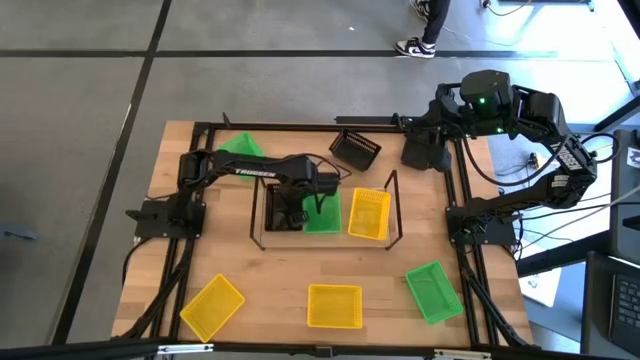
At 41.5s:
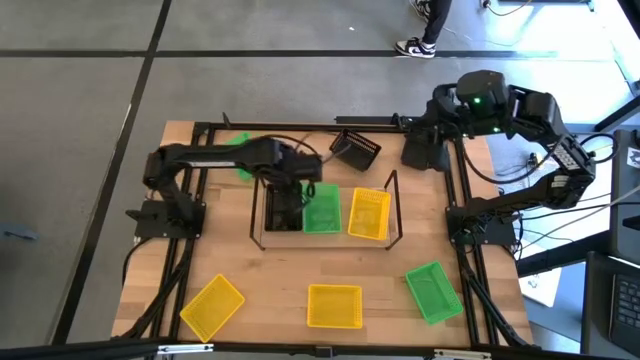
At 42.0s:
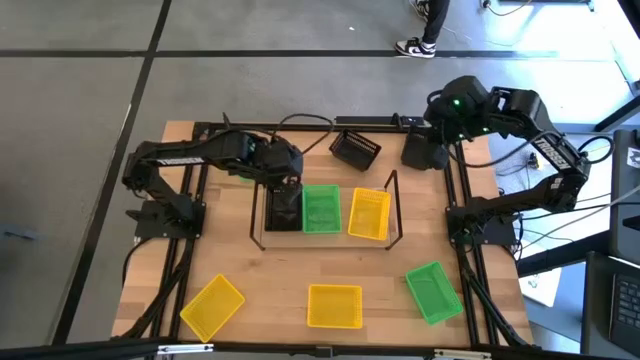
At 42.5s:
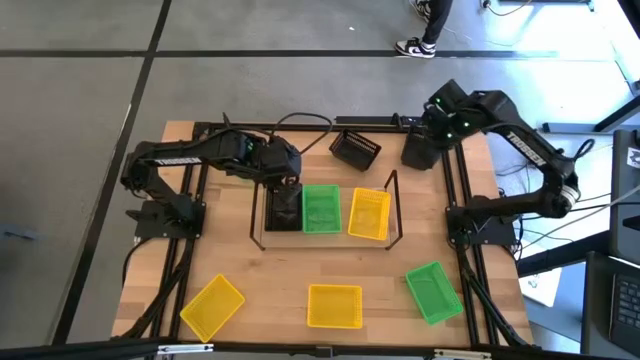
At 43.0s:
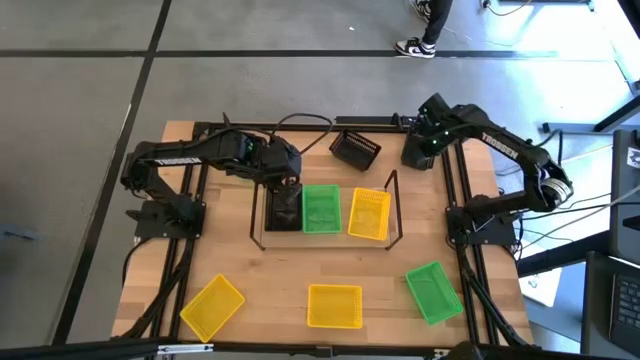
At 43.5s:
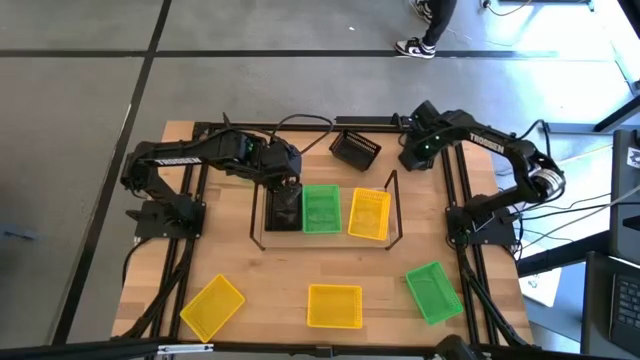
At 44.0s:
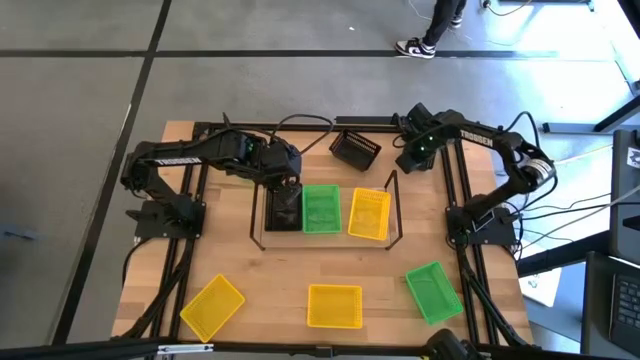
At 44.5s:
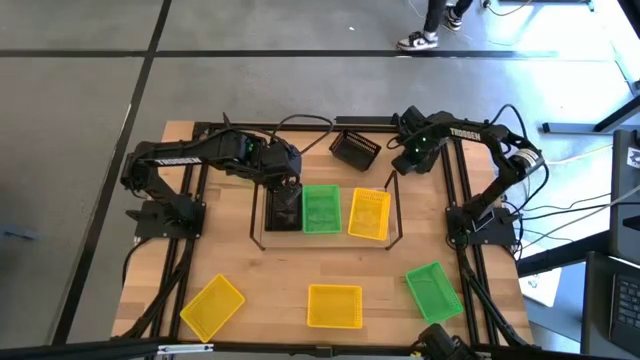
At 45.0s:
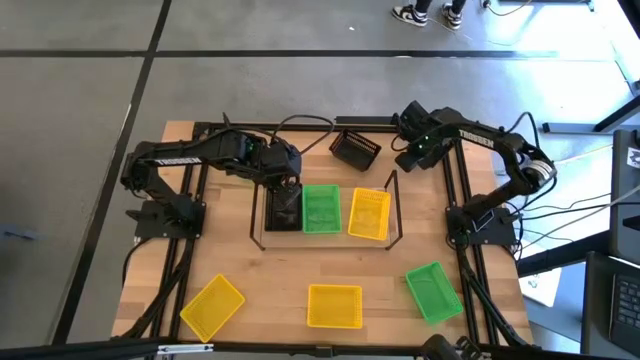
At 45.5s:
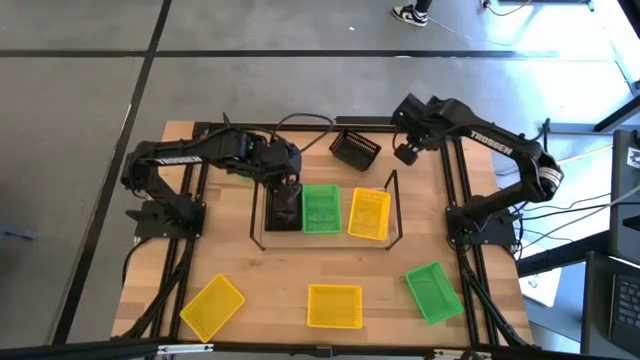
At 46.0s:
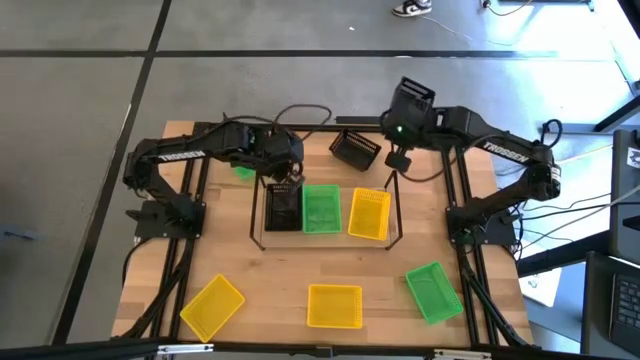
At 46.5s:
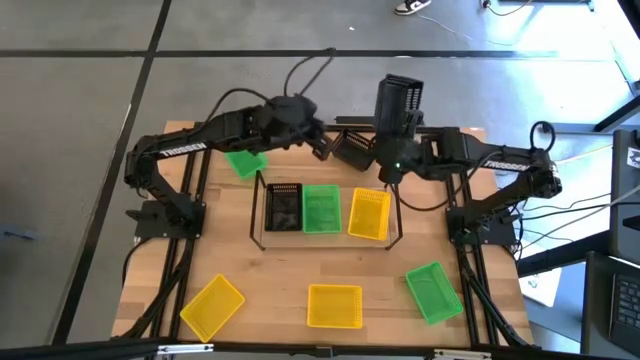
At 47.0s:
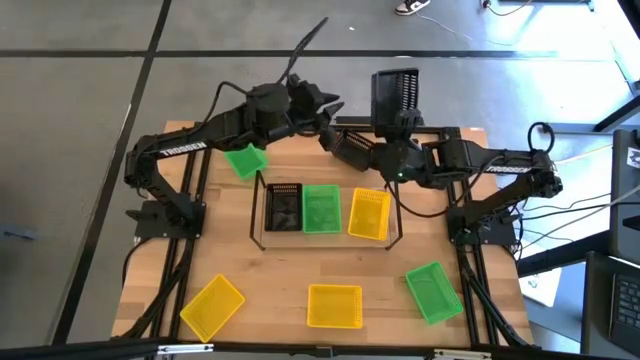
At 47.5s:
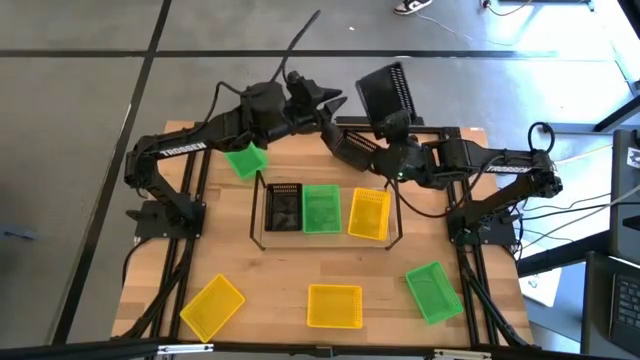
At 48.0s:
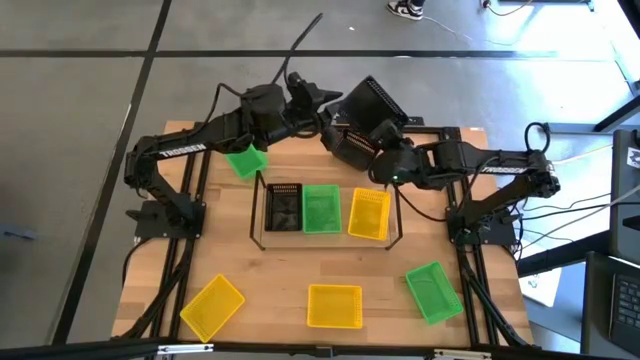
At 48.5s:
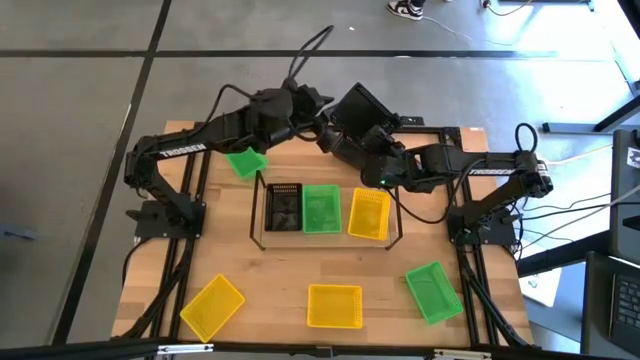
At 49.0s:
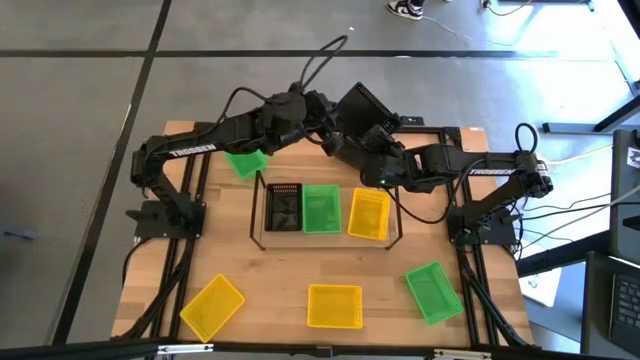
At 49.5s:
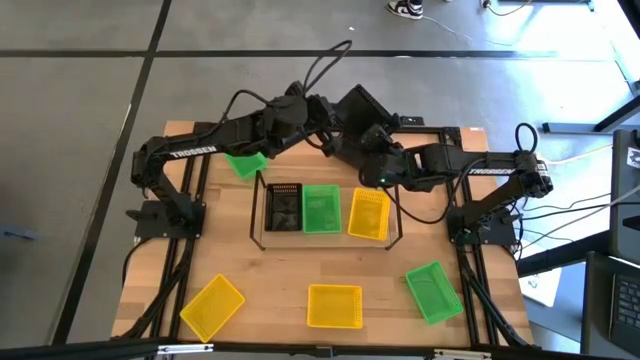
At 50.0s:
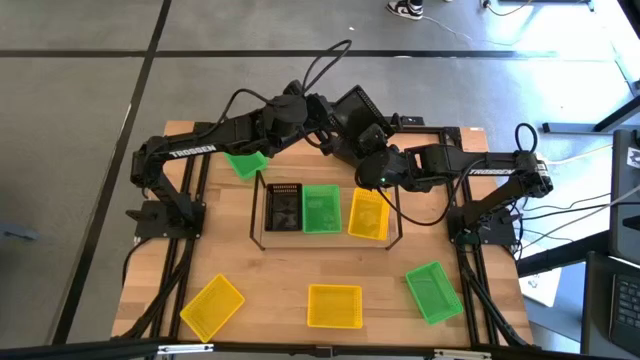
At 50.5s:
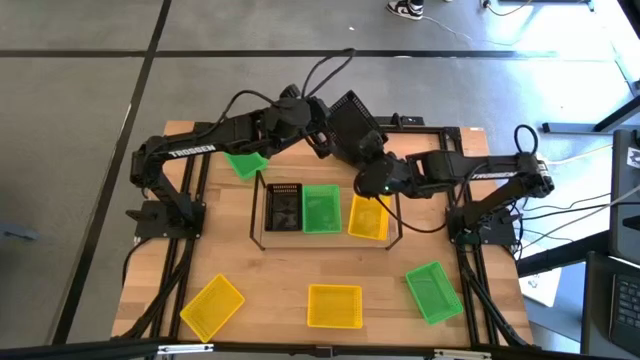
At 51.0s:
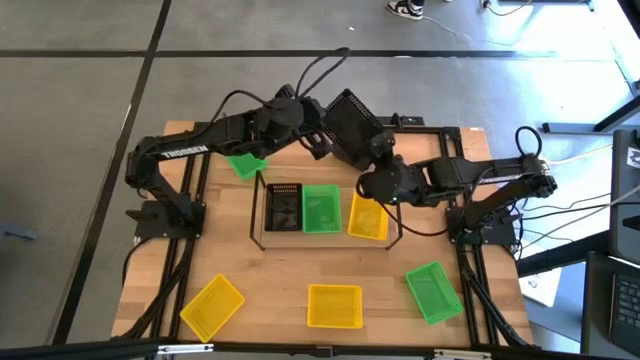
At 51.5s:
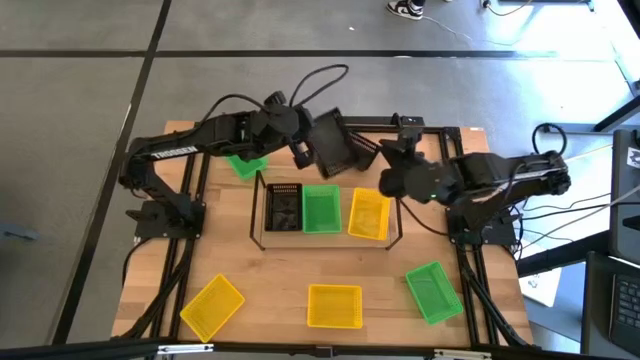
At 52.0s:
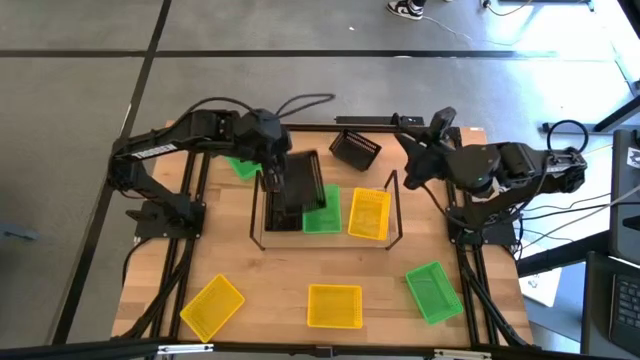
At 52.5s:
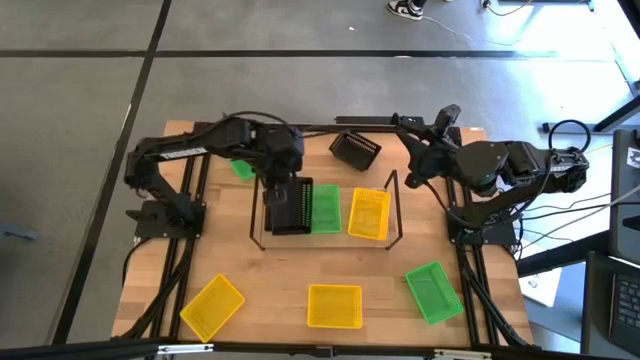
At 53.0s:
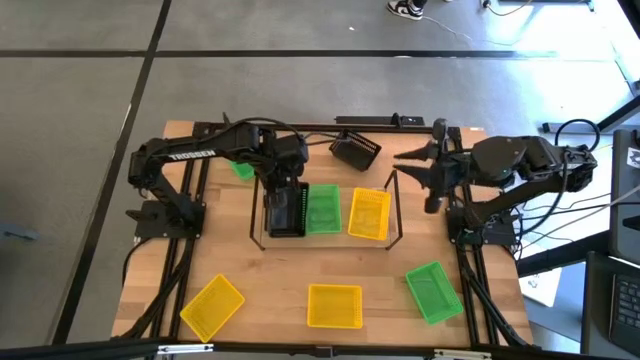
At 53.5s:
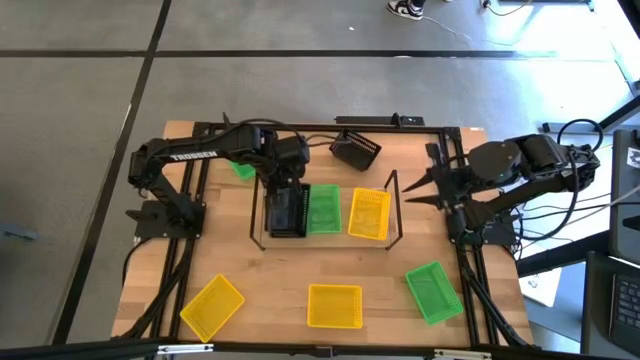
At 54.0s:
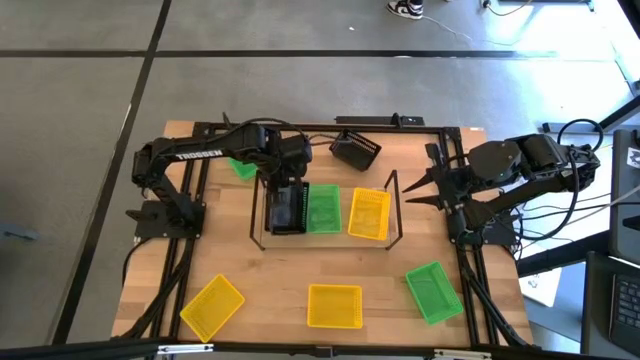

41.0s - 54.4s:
Task: Stack baskets on shelf by color
Stack the right black bin on top of the black bin on the shelf

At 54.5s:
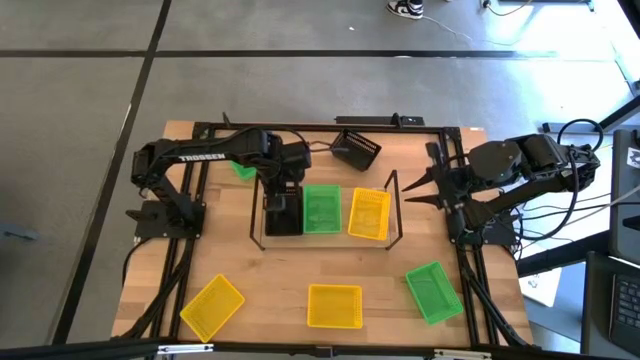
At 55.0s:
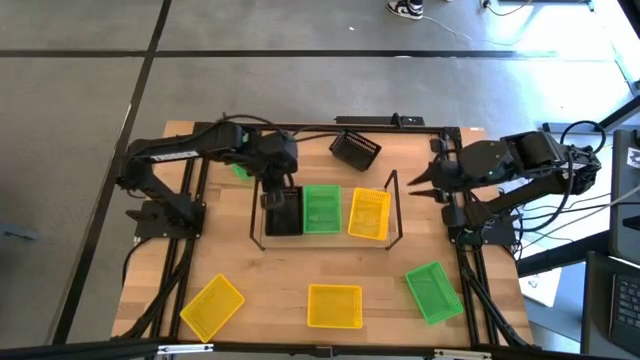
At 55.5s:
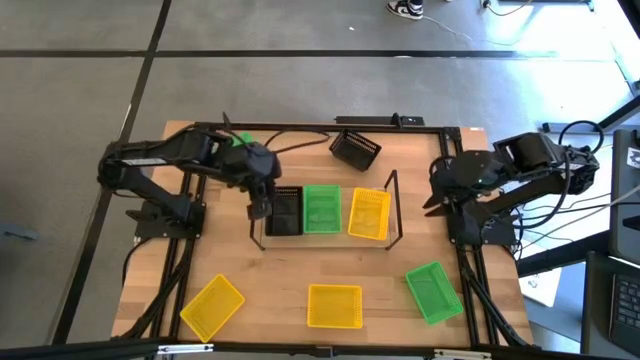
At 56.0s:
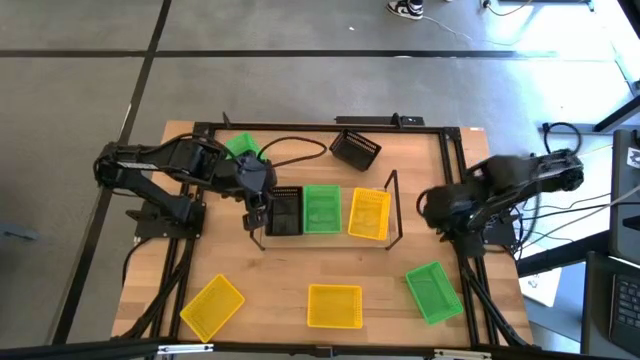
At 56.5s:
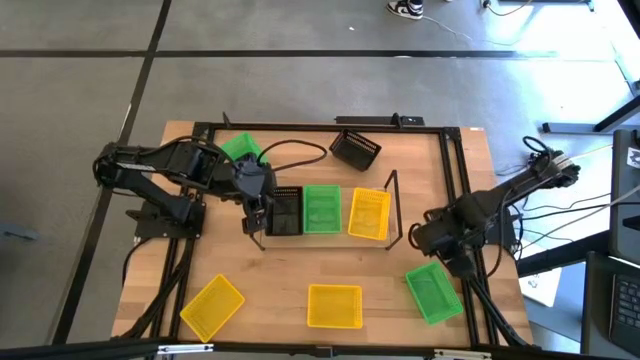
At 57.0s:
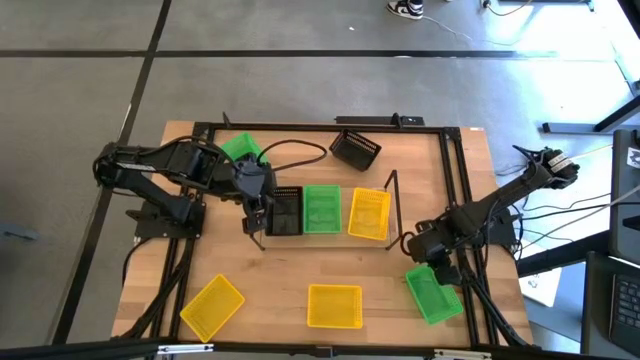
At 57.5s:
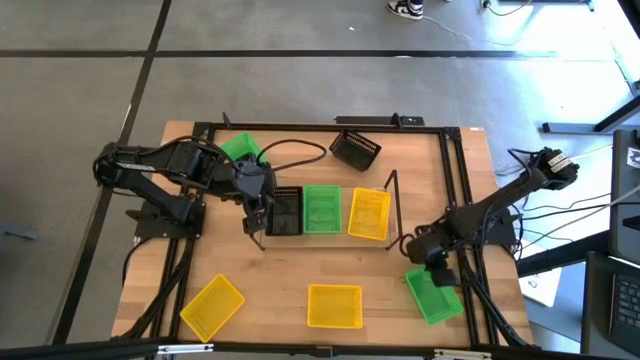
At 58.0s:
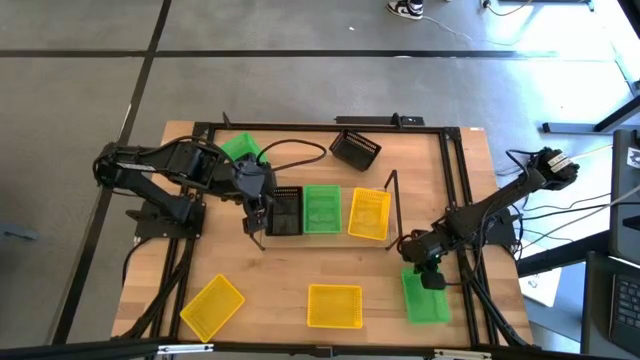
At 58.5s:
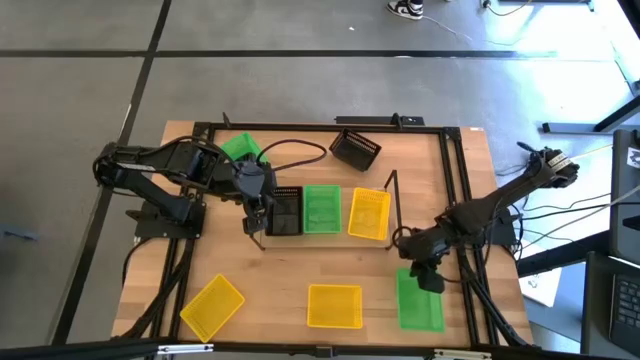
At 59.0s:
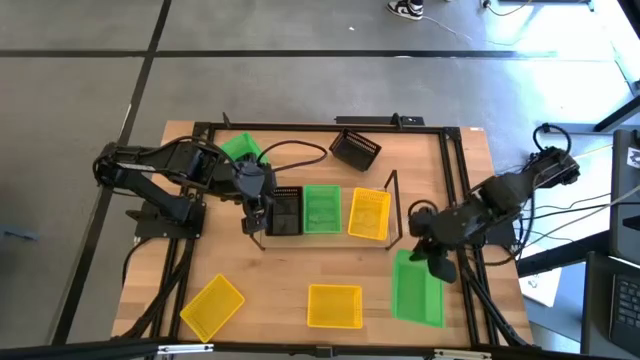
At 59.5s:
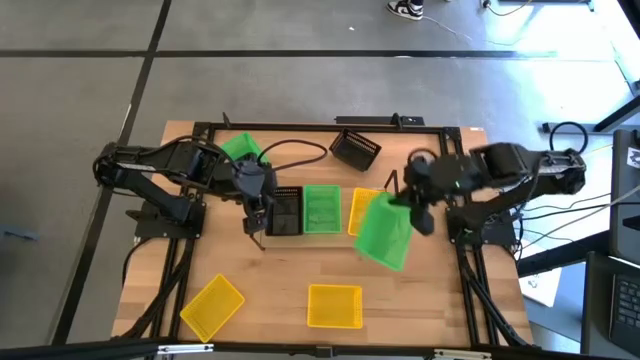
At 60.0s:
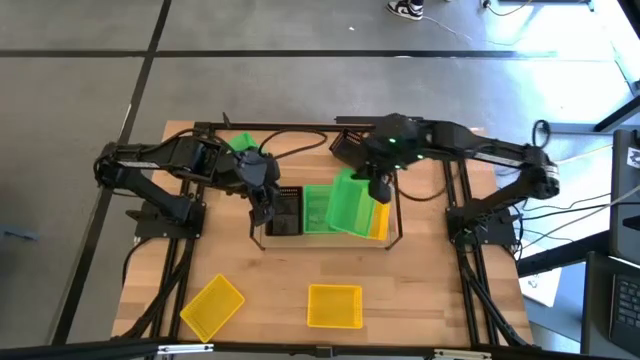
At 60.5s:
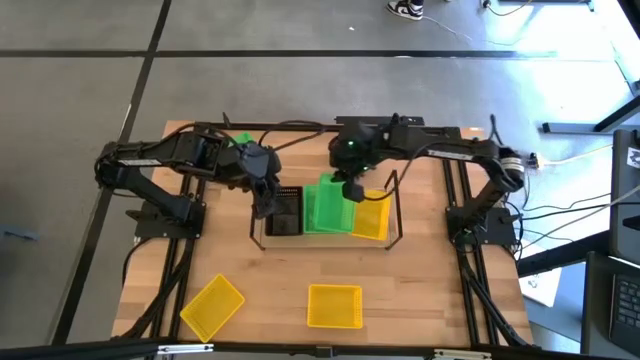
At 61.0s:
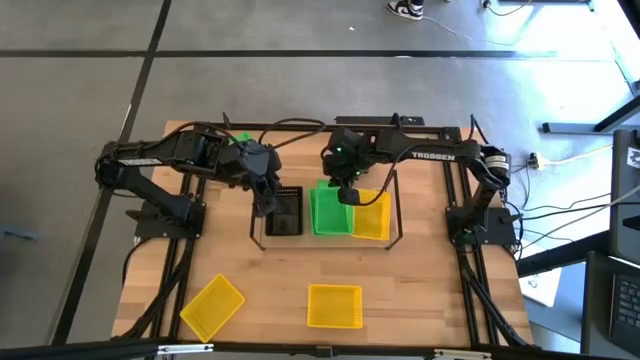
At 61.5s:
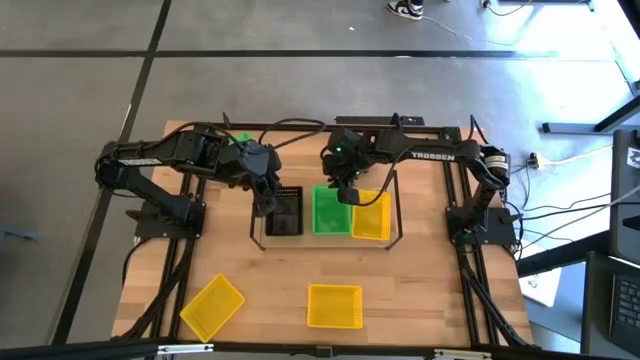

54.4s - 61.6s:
Stack the bottom green bin on top of the green bin on the shelf
